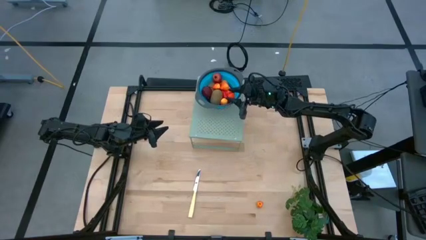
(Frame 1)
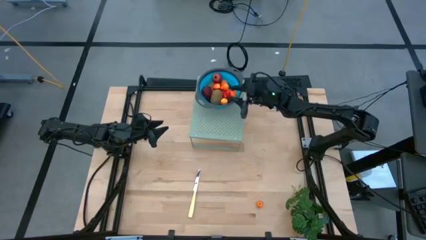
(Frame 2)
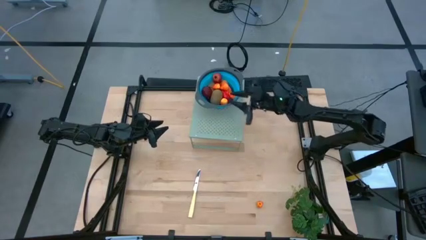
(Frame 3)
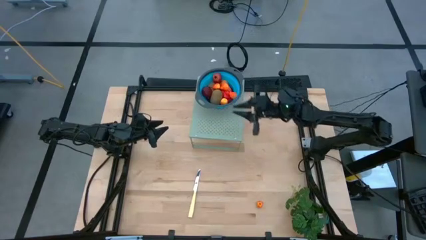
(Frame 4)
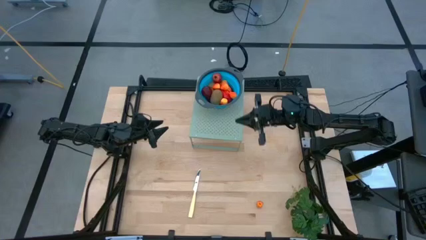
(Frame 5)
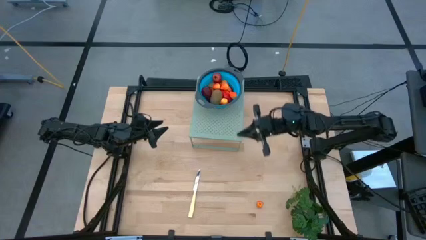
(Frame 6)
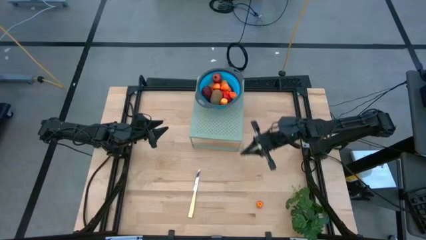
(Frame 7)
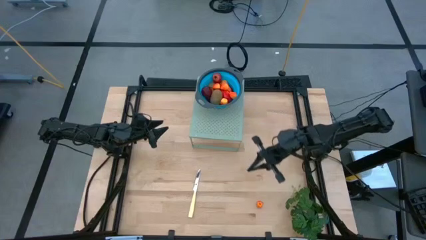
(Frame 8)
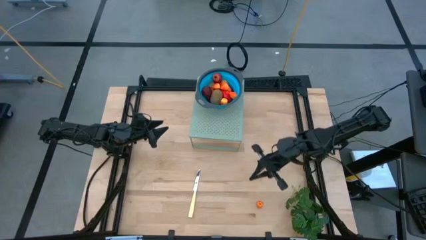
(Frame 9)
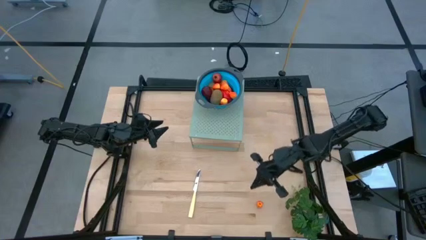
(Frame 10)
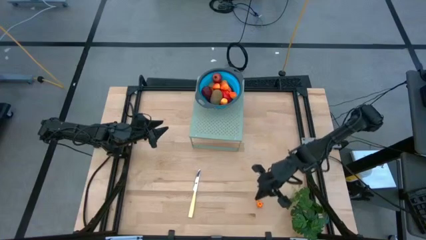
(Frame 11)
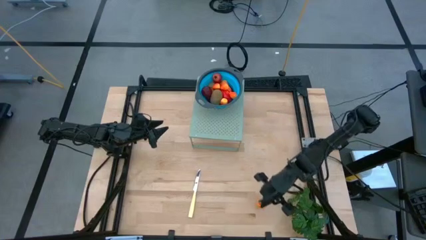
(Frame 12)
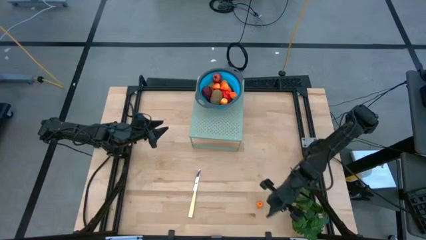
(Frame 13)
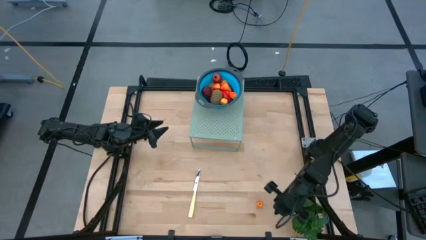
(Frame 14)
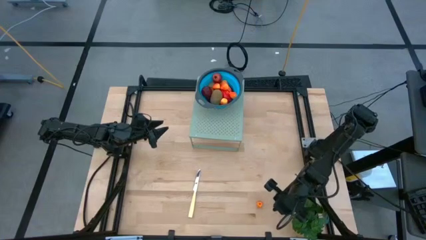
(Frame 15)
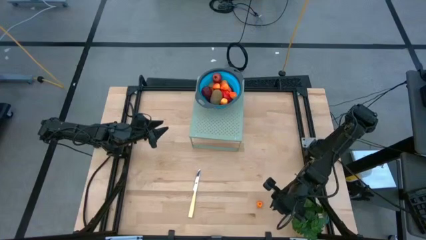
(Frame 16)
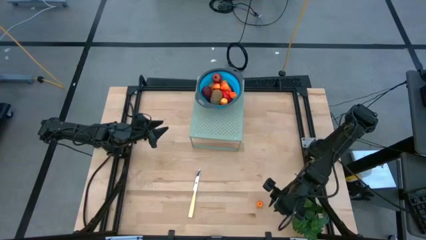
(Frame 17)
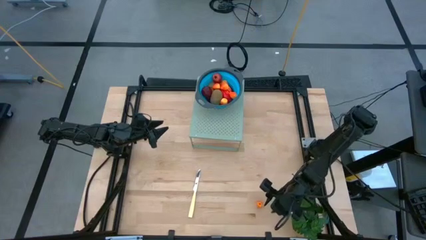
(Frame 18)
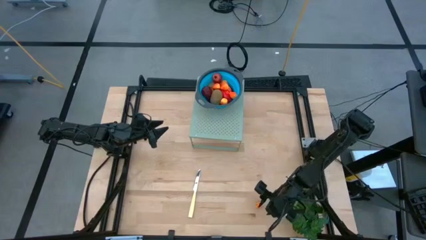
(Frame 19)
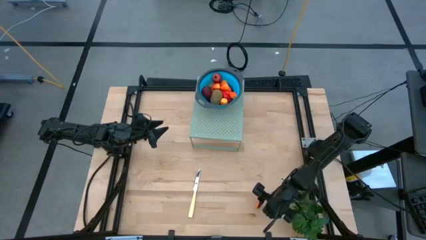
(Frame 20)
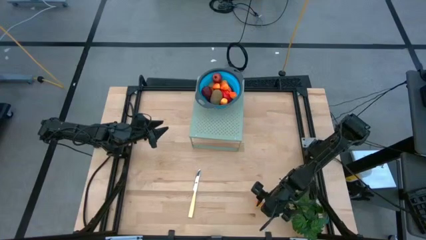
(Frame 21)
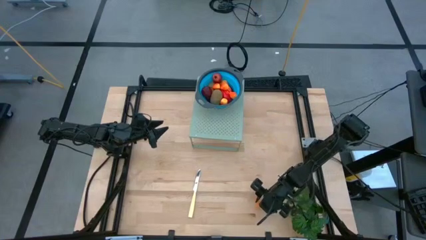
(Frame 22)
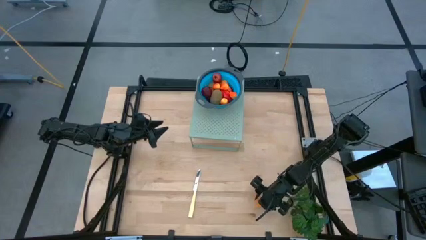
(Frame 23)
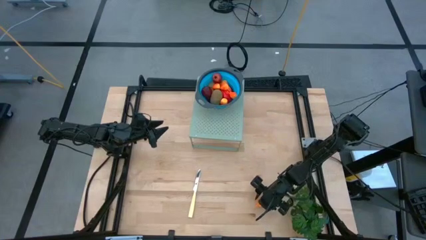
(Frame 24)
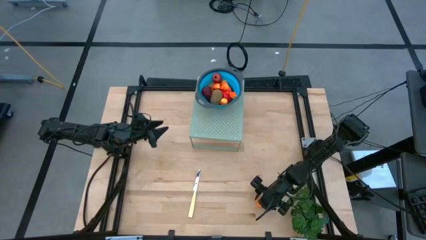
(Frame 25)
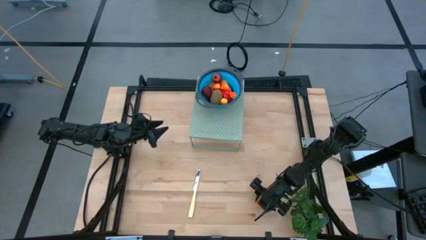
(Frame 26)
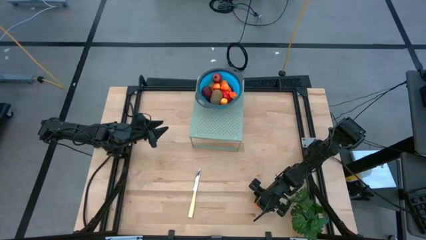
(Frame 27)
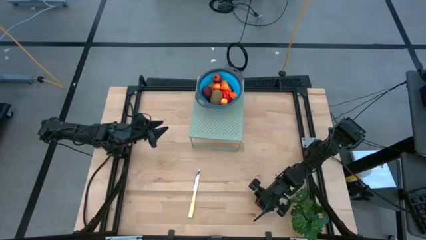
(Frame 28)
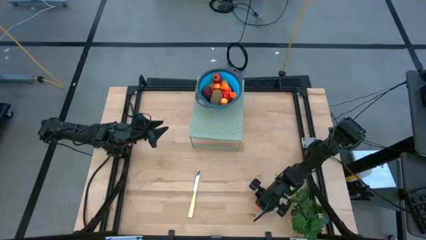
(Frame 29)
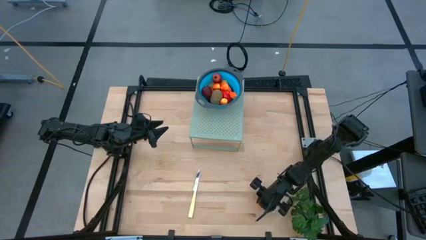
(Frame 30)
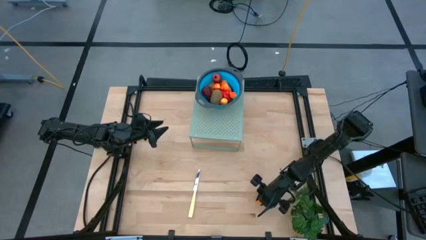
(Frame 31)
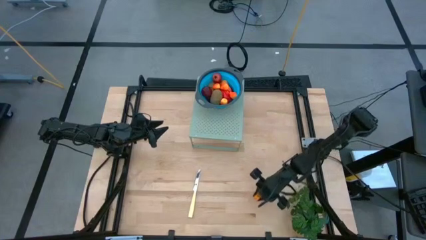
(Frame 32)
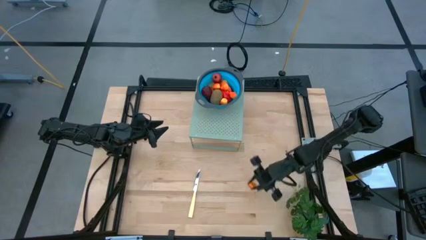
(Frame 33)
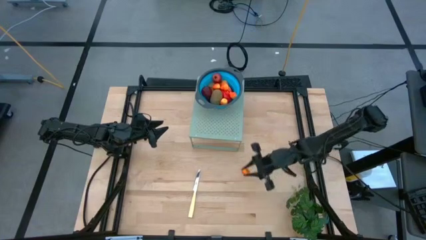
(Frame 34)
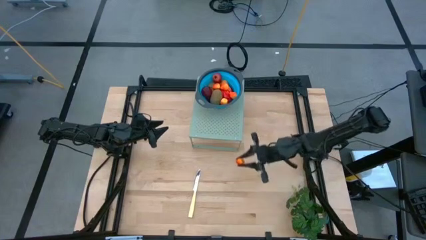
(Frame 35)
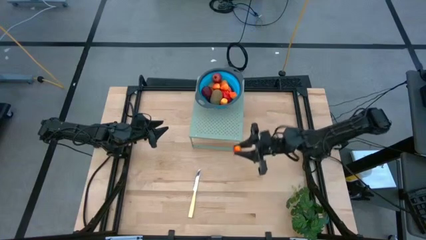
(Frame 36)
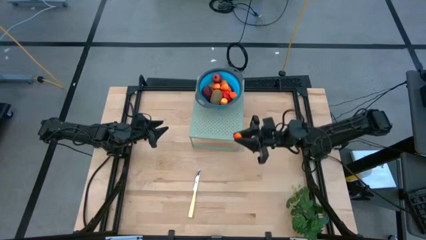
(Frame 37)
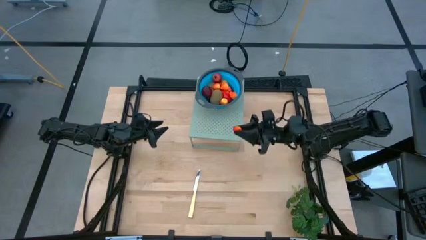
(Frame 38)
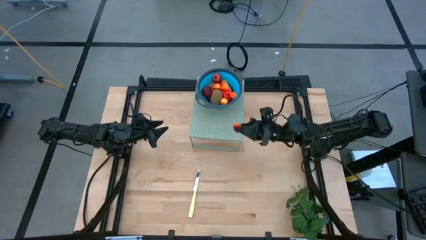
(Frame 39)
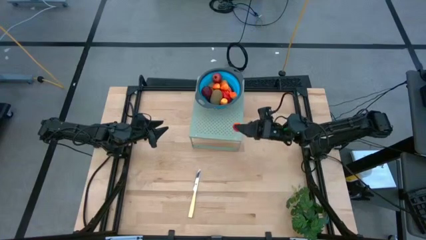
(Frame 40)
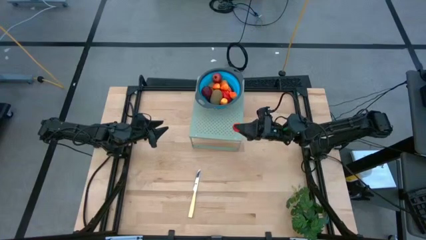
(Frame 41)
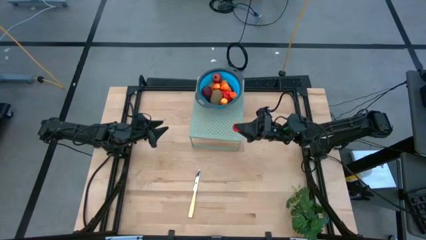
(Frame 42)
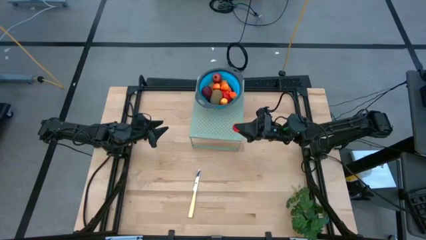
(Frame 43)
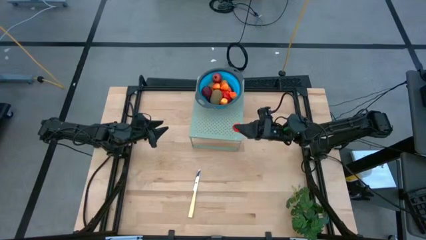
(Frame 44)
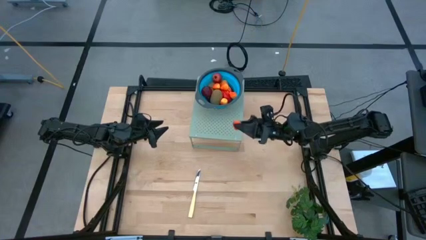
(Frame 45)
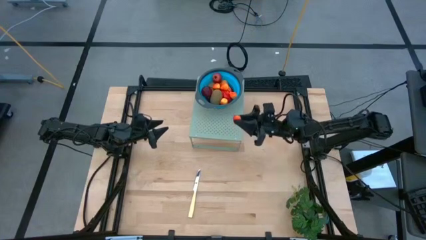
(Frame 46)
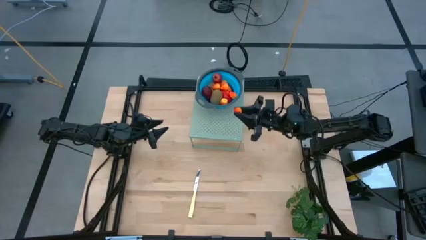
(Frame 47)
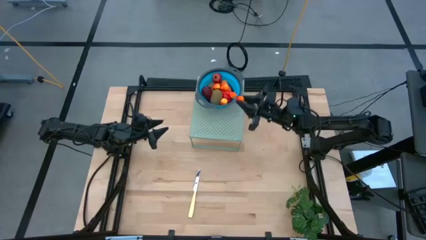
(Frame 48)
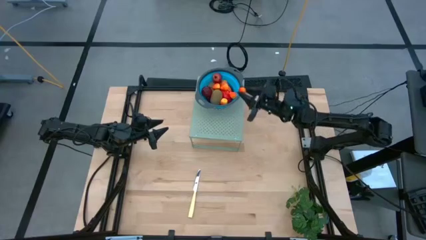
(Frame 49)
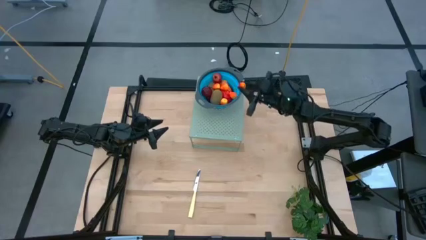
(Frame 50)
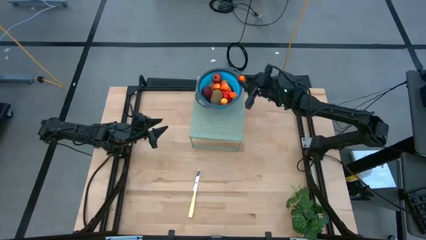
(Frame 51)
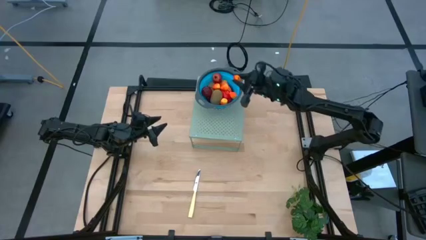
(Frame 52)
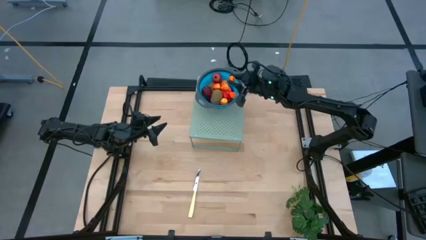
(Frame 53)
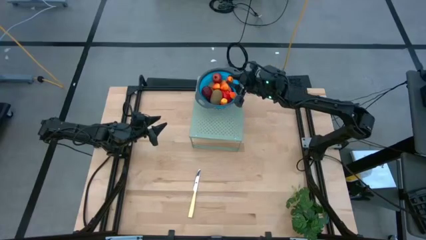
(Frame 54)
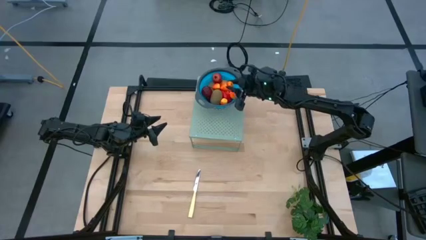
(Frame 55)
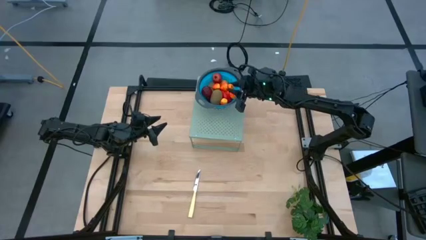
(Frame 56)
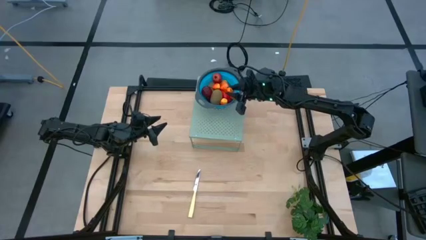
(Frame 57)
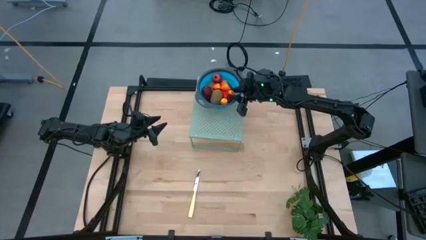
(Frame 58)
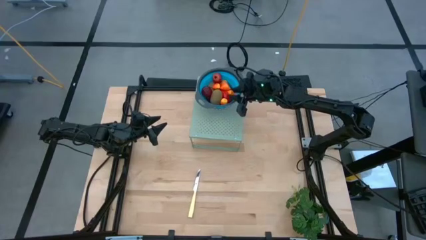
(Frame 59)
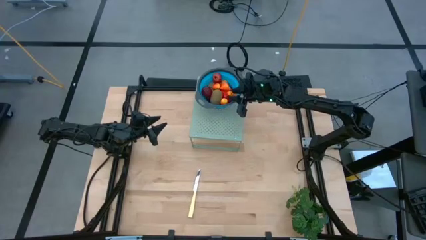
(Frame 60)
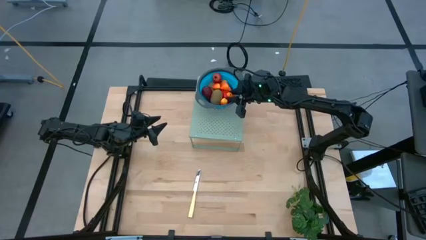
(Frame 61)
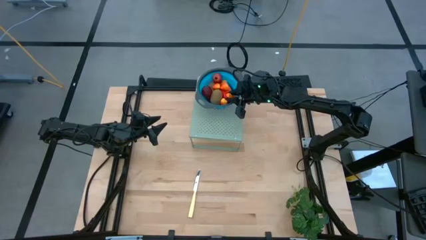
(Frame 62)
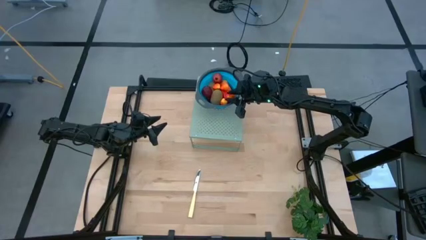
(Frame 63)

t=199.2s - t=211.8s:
Task: Pick & Place Fruit
Put the peach into the blue strainer bowl on the shelf
